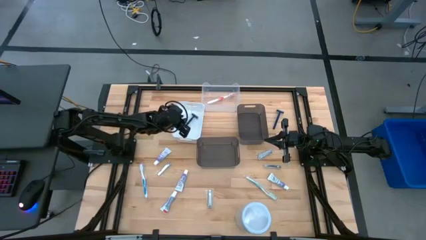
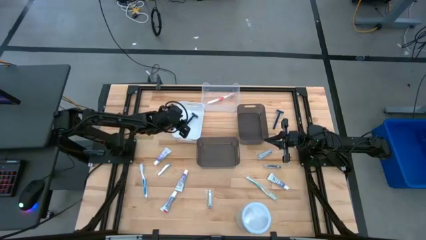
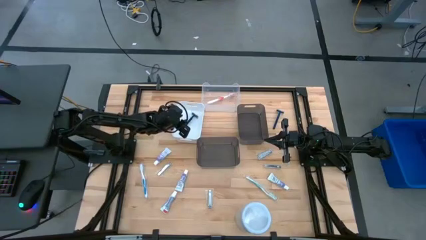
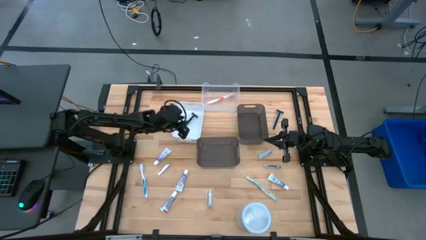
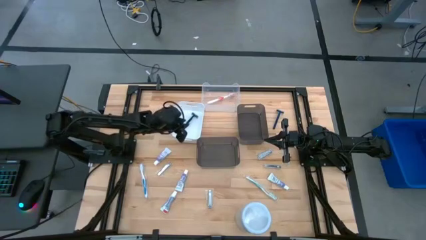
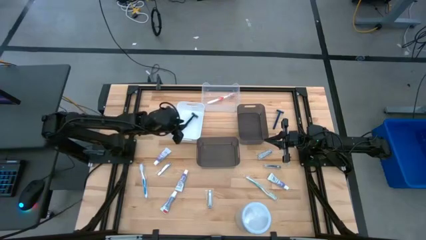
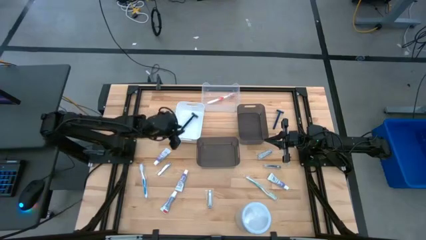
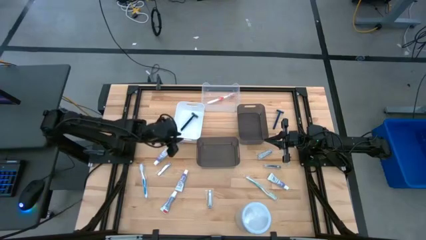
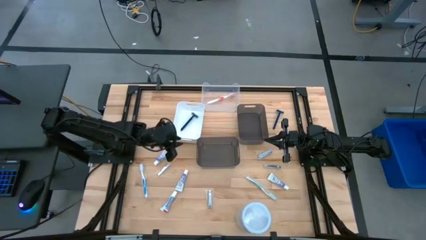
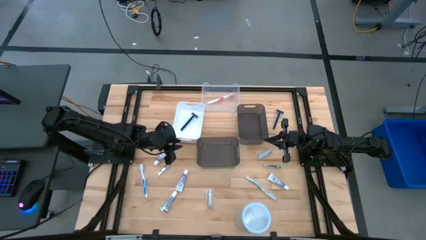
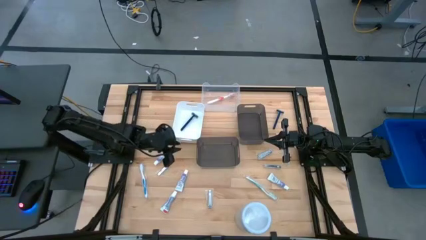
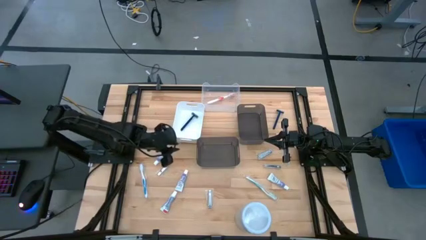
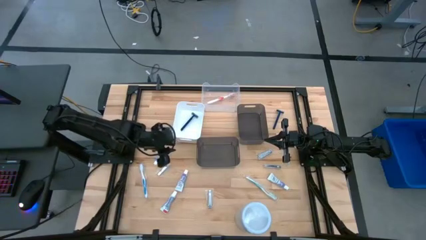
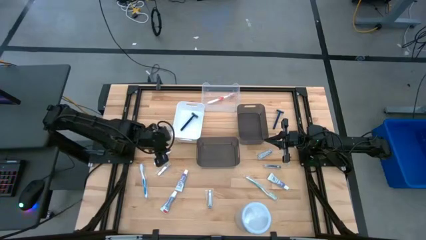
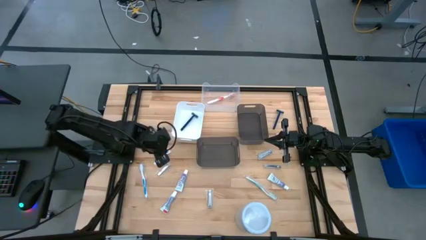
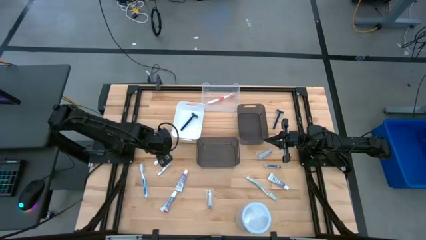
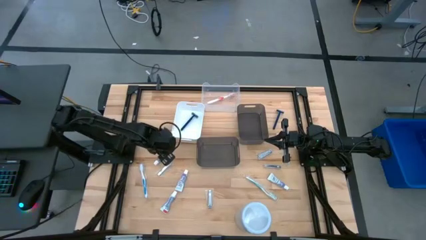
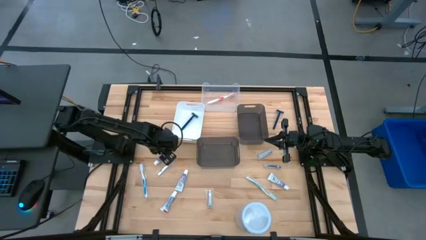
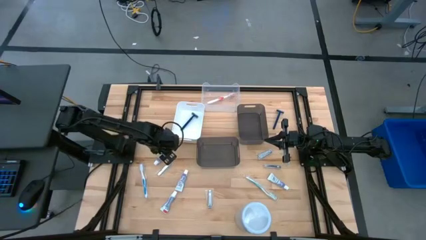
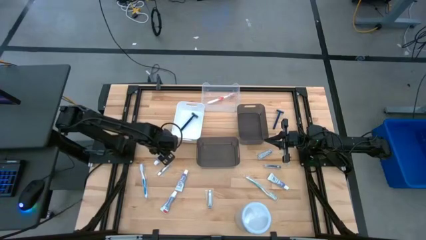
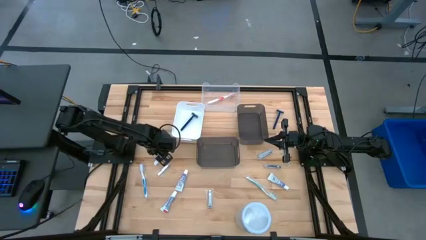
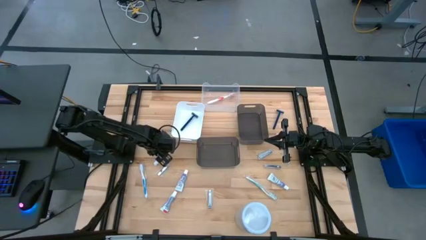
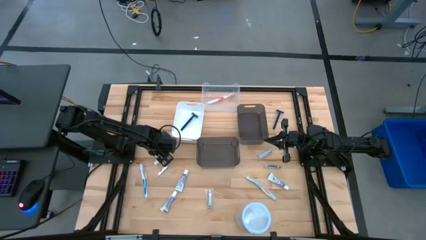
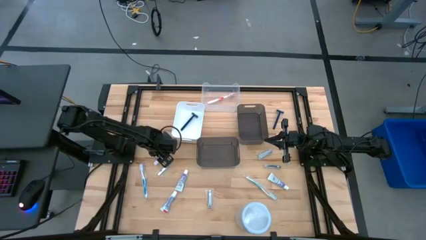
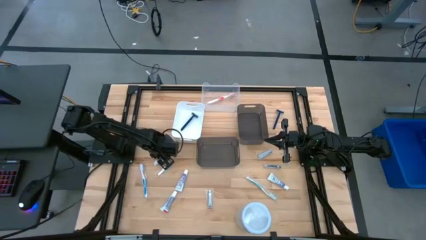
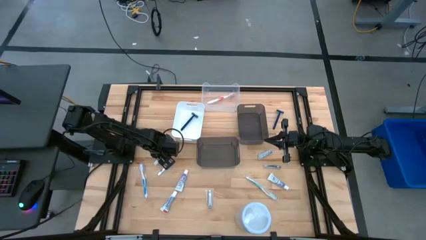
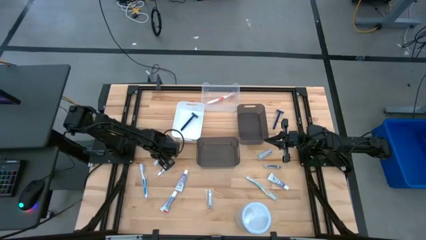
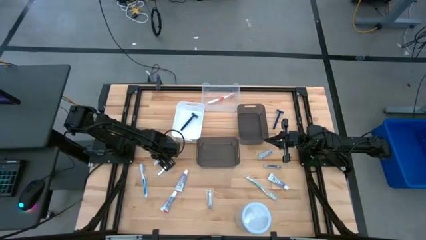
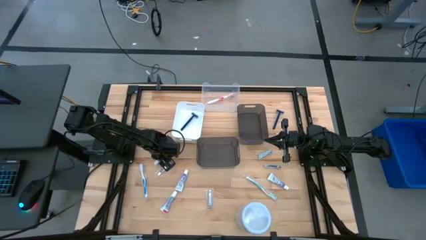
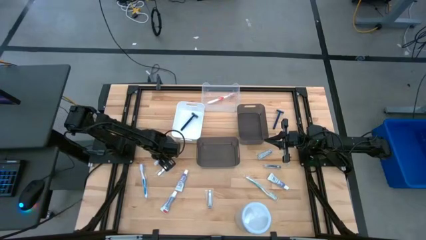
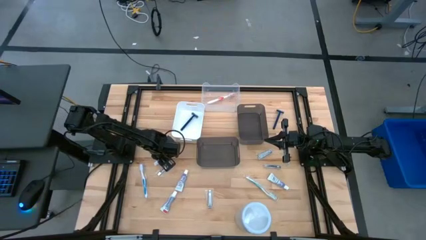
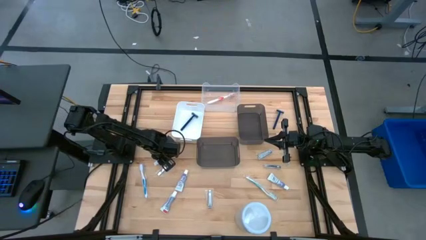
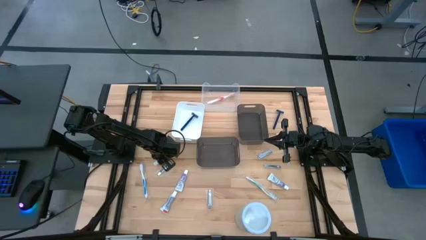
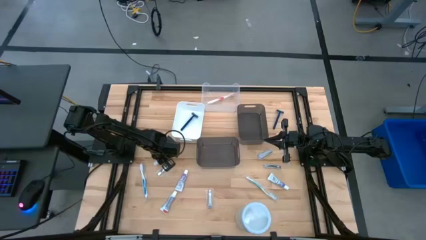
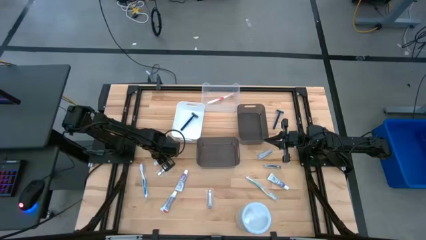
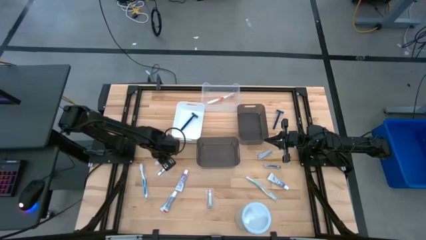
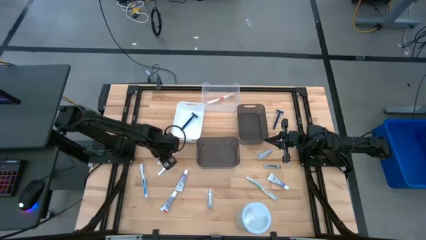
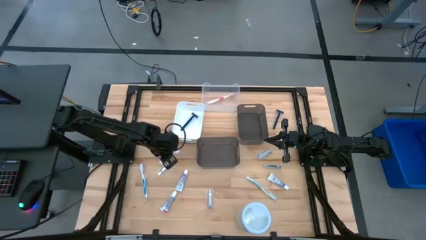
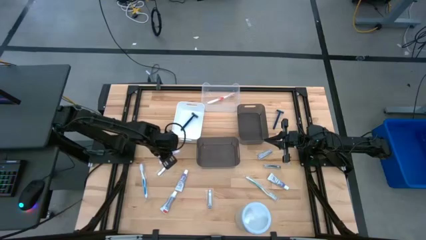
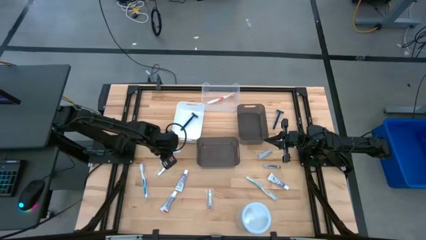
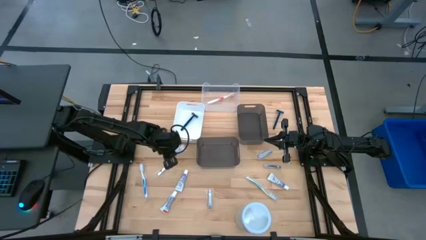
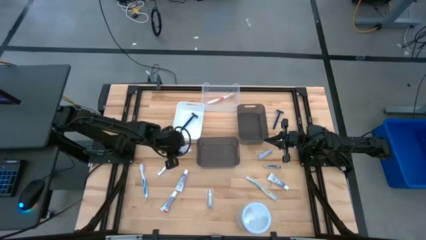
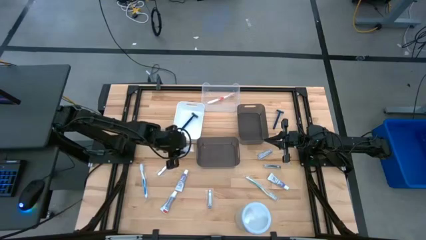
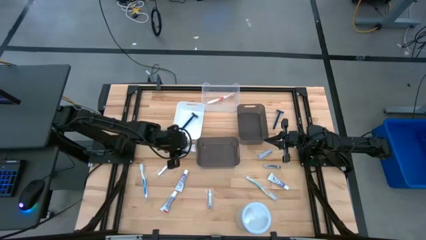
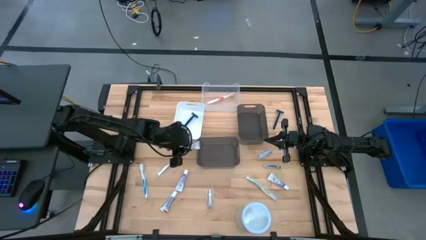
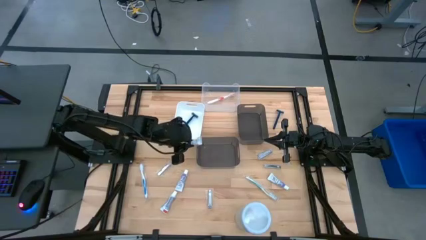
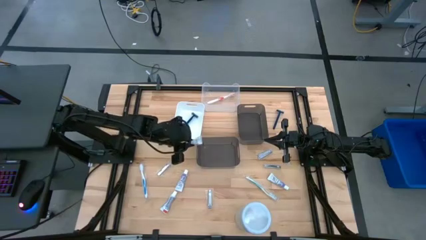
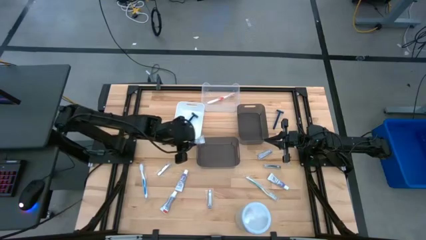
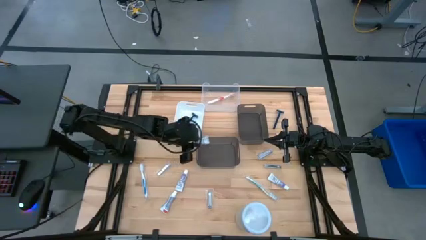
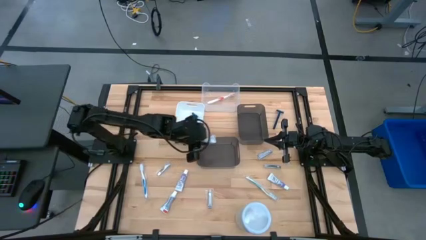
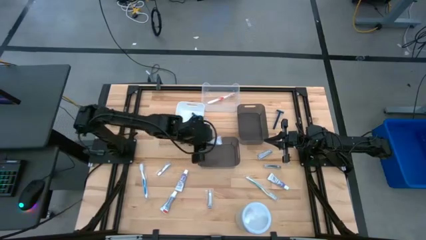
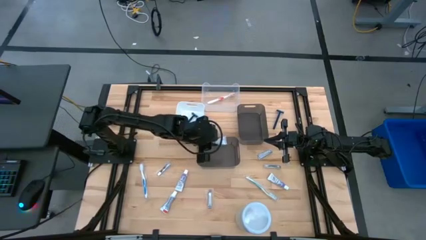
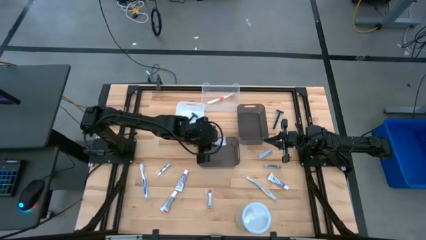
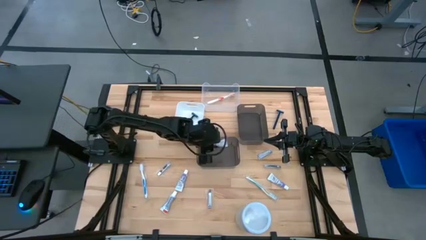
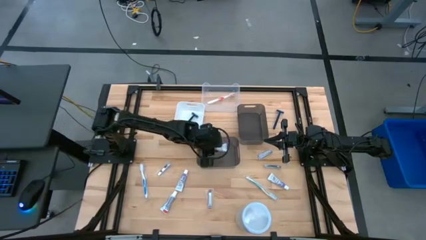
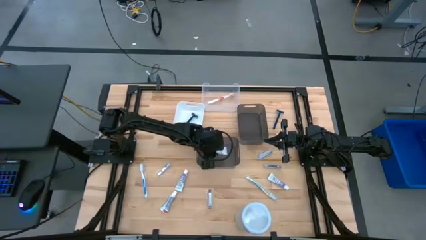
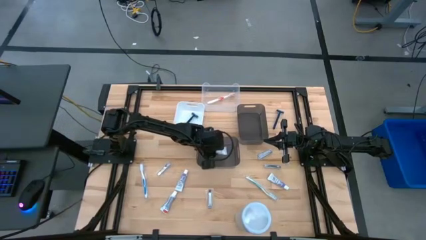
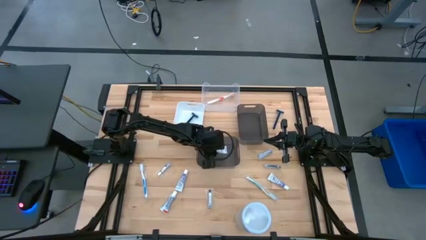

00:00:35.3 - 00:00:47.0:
Task: Pick & Place Travel size toiletries
Put the white toothpaste into the bottom black bin
